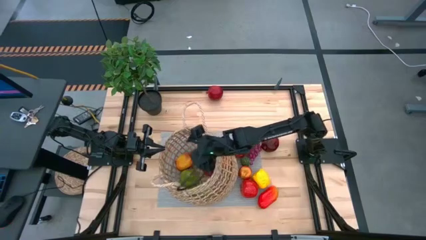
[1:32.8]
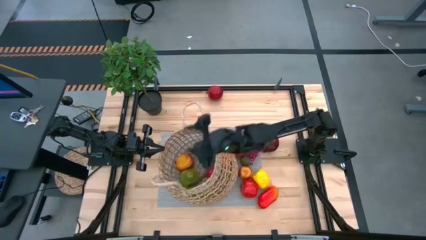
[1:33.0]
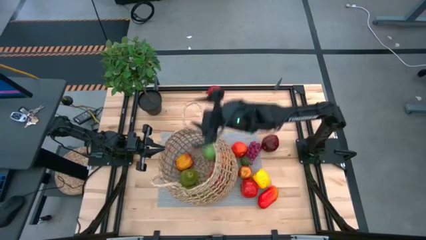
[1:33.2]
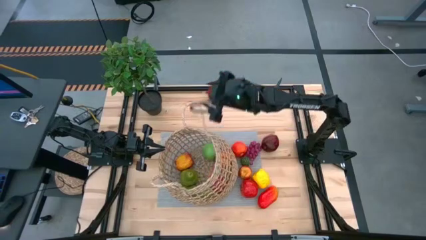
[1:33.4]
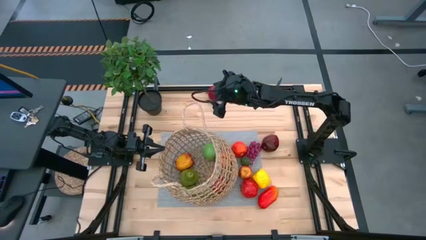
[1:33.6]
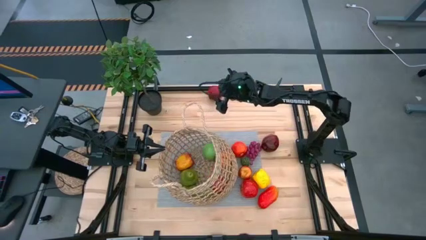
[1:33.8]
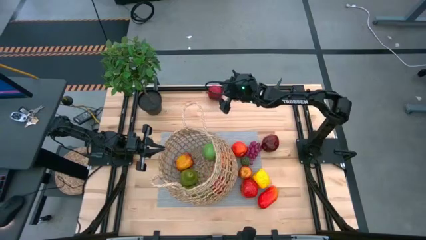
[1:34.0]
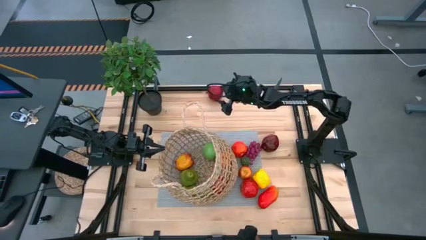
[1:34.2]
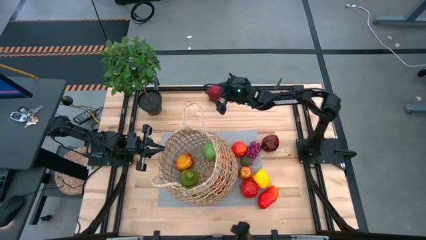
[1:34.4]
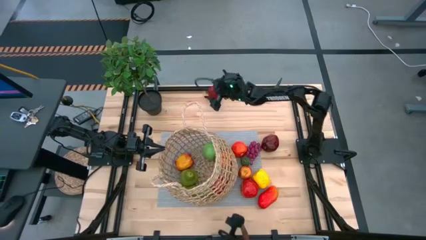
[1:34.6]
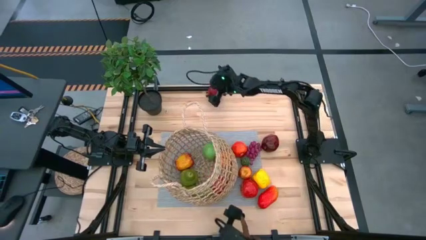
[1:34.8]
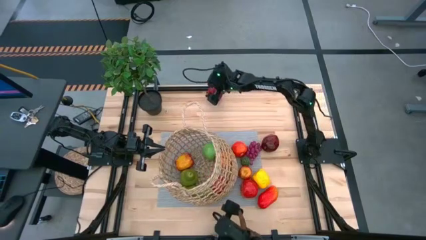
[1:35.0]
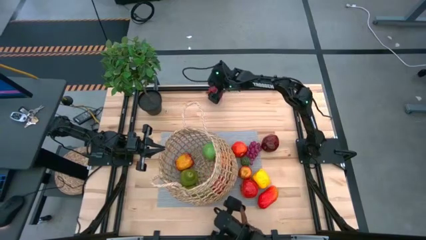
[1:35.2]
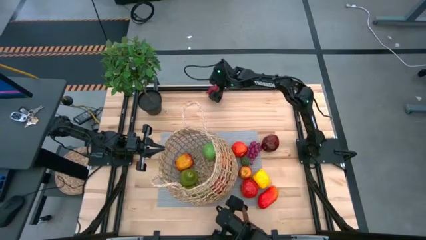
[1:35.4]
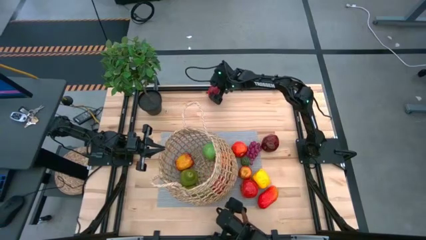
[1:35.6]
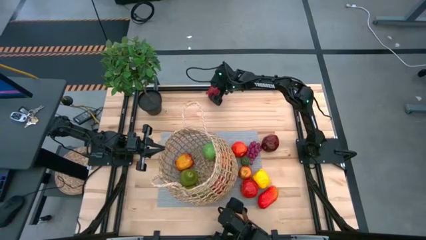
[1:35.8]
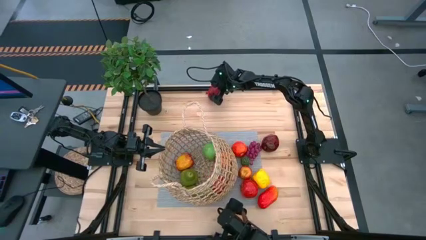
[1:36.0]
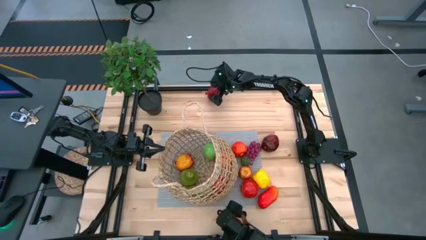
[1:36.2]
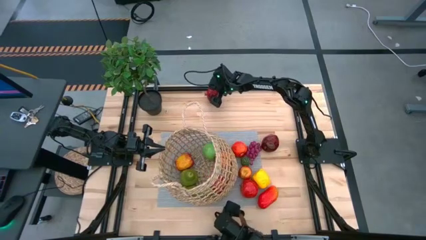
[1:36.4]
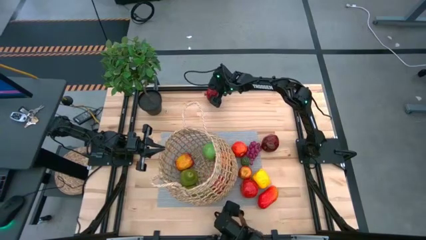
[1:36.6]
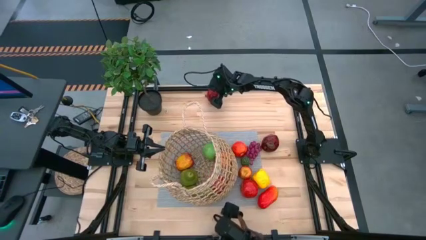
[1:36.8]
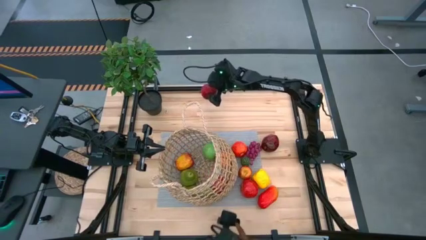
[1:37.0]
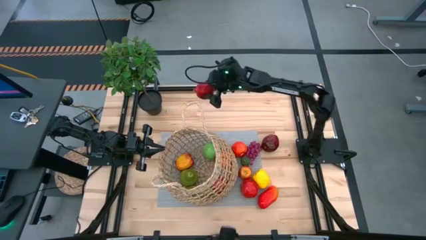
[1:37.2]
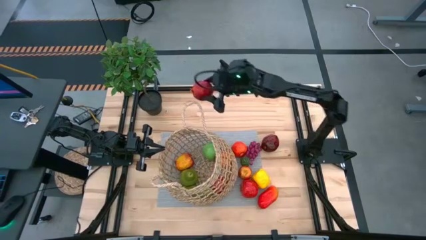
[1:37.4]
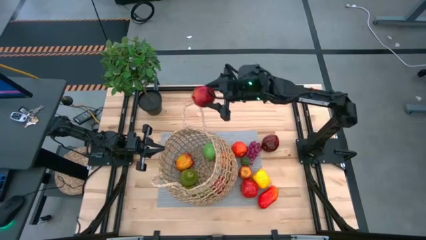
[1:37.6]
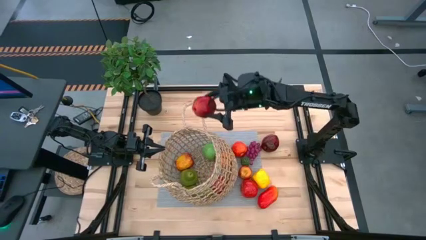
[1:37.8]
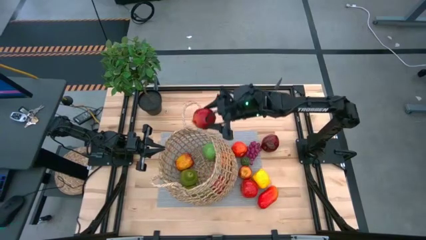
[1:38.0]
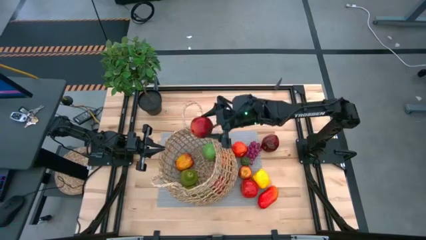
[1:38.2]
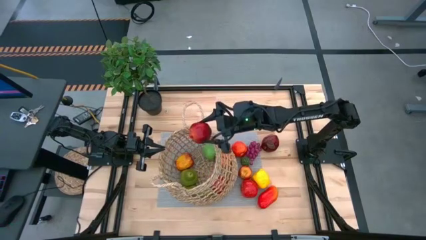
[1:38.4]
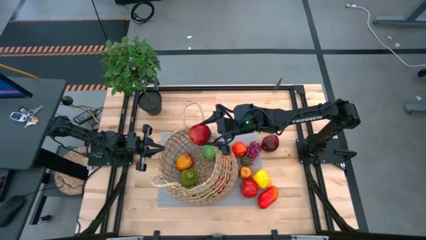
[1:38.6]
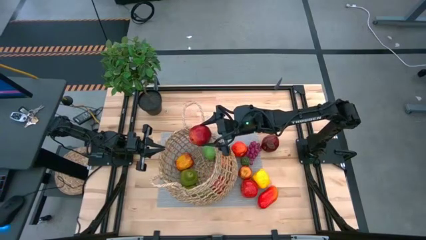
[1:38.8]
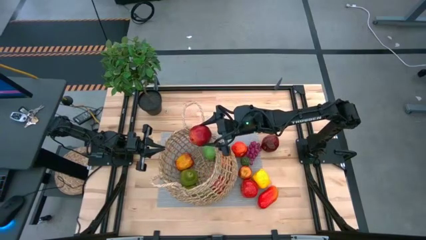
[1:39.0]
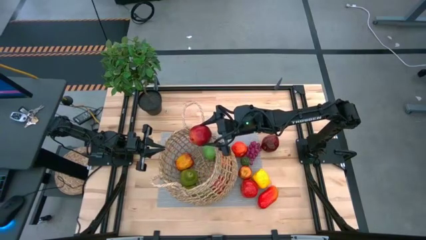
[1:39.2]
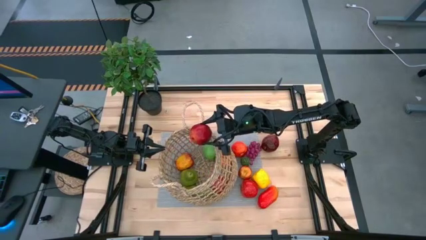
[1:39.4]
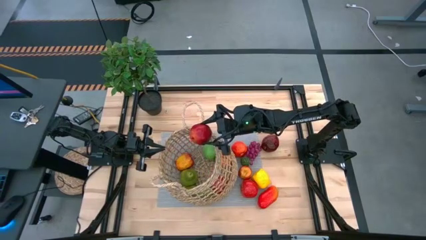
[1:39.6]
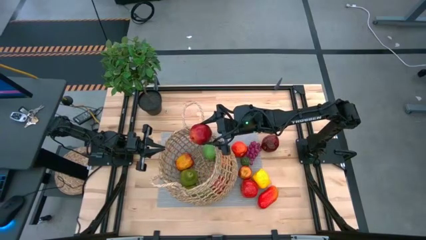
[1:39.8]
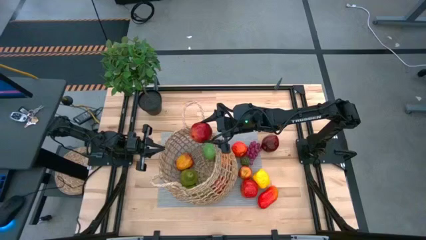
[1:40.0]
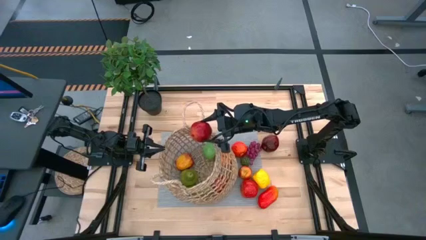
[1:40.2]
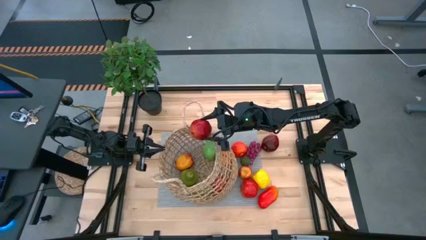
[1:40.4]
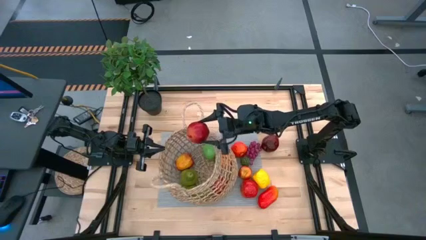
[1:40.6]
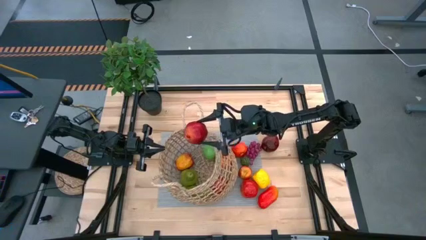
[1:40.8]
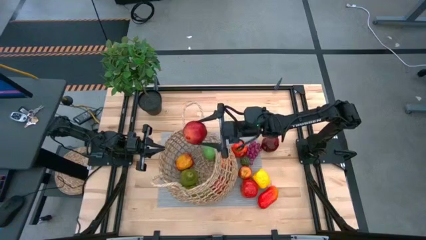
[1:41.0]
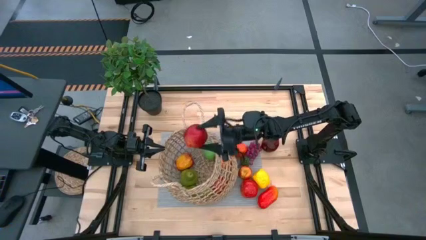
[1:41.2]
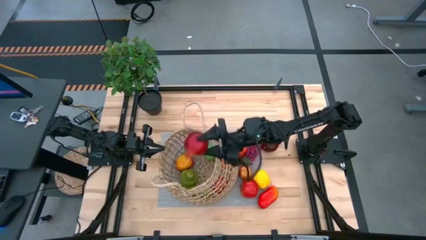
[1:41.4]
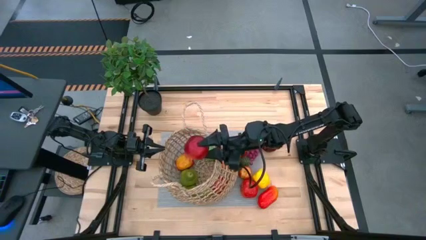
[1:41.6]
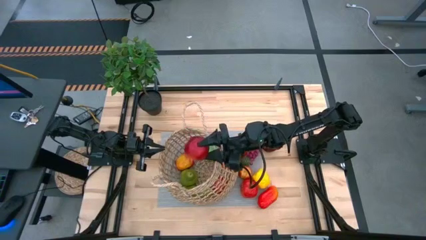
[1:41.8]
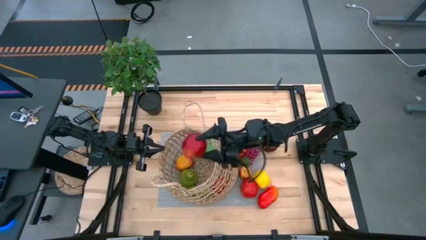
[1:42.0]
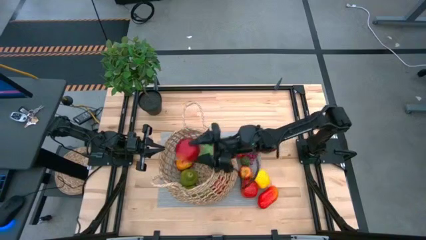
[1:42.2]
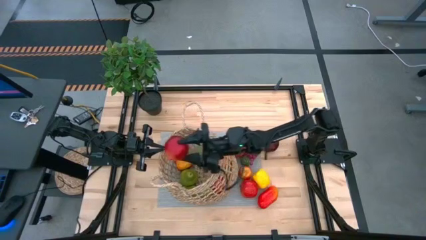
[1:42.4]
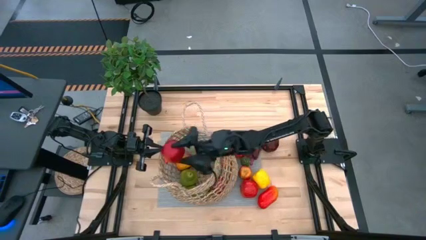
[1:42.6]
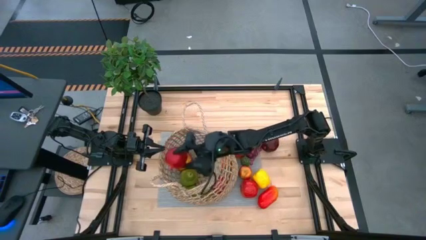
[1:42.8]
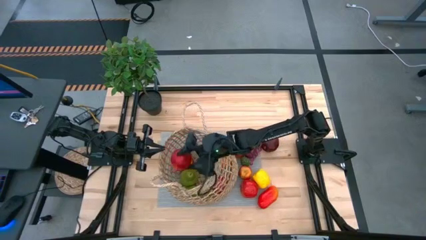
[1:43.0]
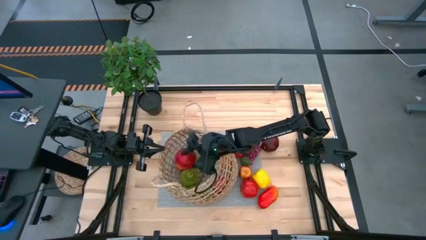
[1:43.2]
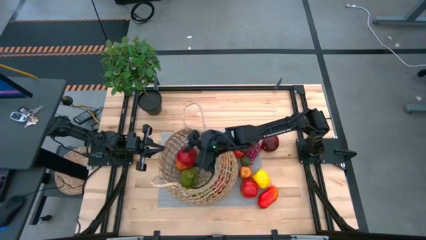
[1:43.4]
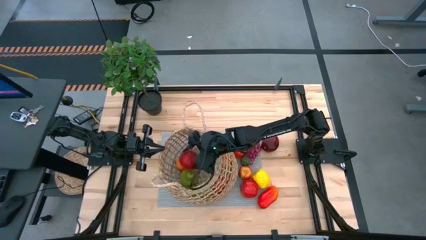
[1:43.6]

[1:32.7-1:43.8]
Task: Build produce basket
Put the pomegranate into the brown basket

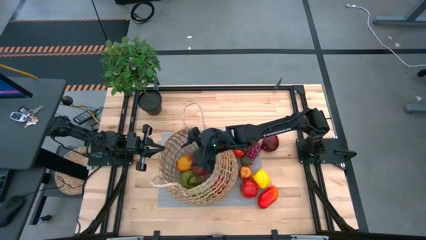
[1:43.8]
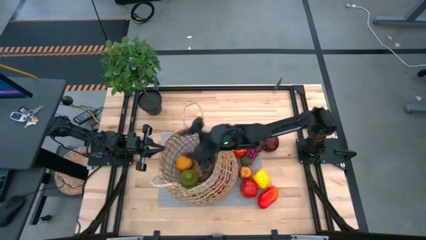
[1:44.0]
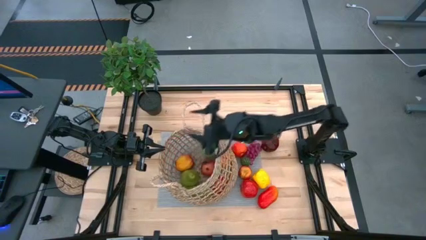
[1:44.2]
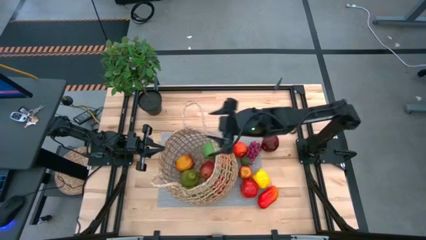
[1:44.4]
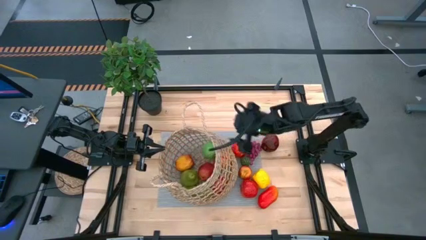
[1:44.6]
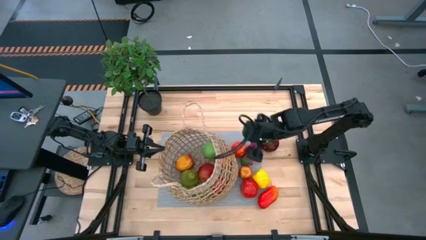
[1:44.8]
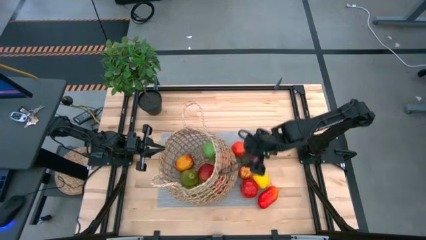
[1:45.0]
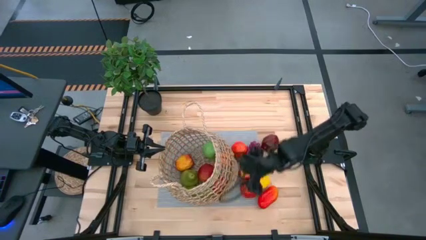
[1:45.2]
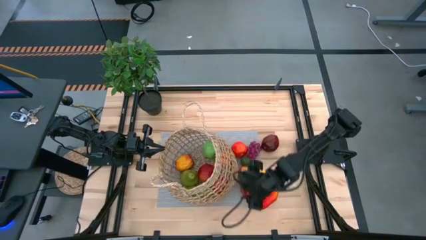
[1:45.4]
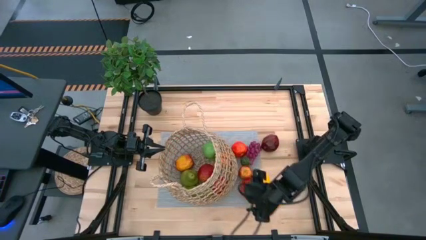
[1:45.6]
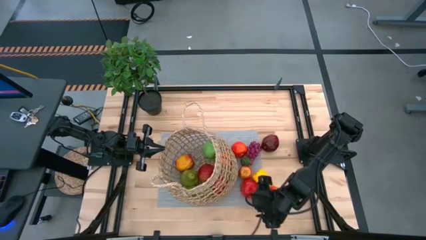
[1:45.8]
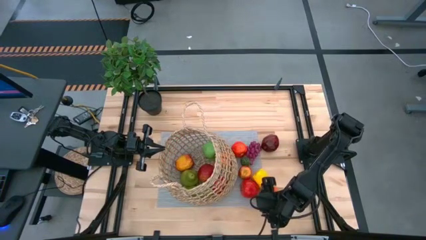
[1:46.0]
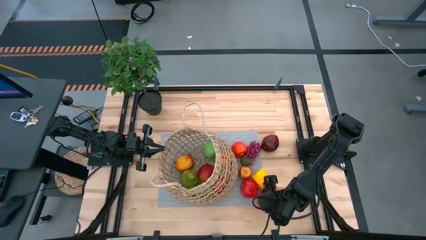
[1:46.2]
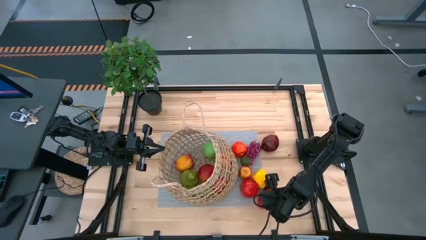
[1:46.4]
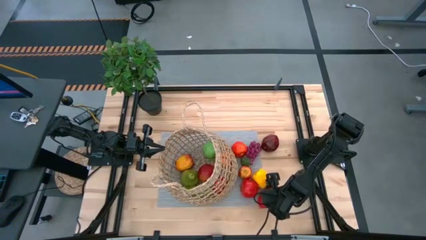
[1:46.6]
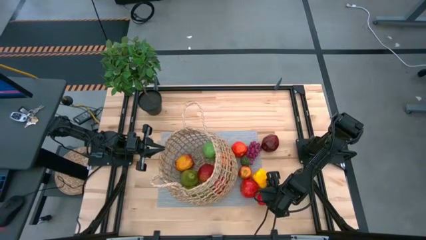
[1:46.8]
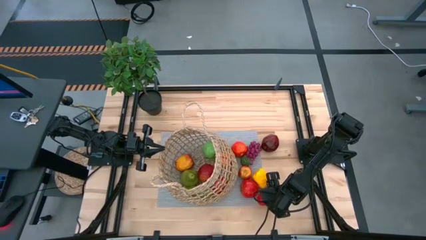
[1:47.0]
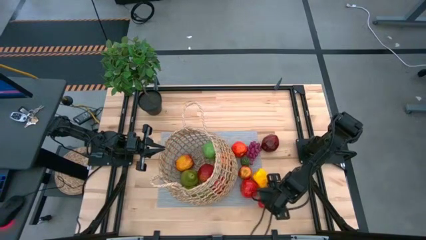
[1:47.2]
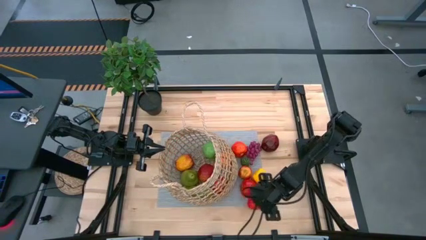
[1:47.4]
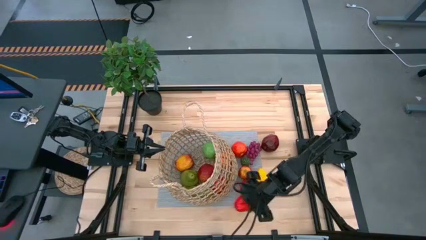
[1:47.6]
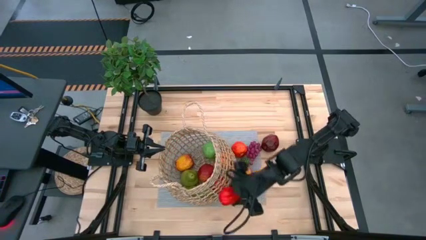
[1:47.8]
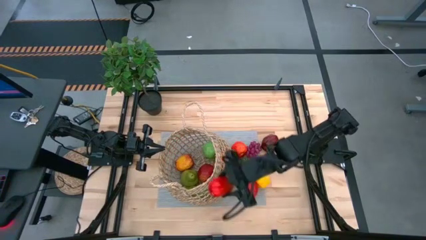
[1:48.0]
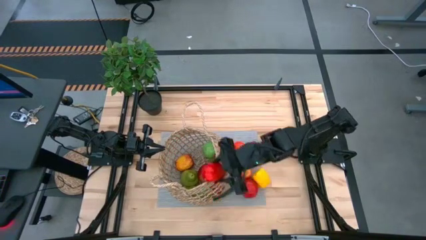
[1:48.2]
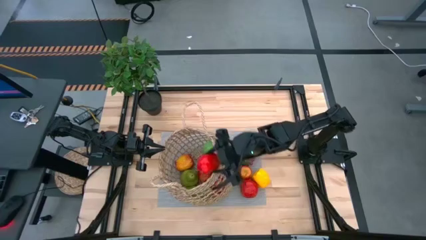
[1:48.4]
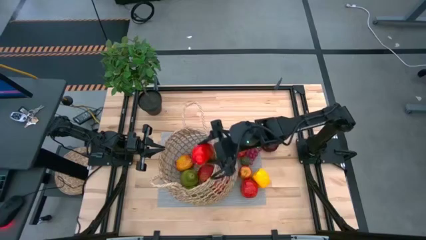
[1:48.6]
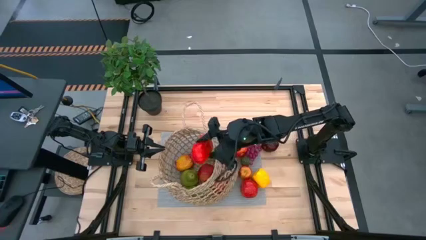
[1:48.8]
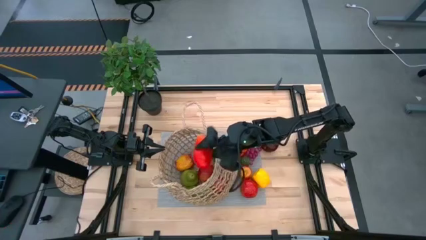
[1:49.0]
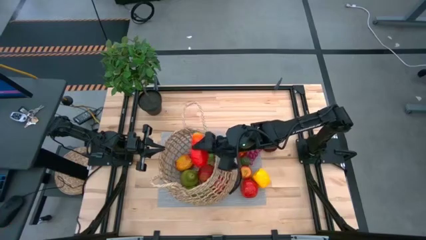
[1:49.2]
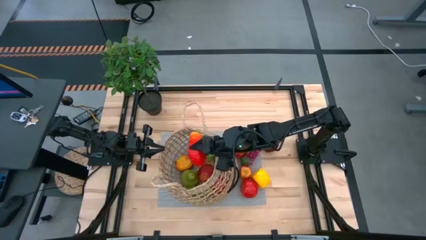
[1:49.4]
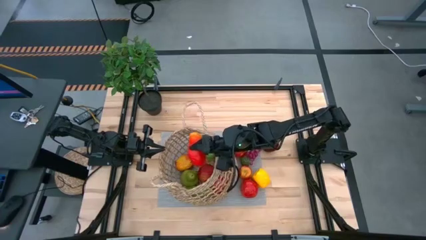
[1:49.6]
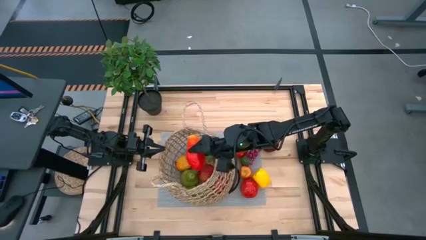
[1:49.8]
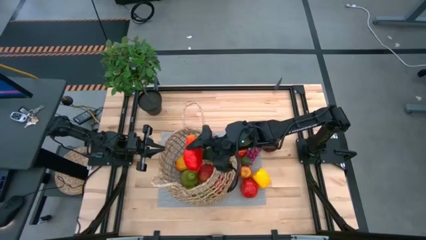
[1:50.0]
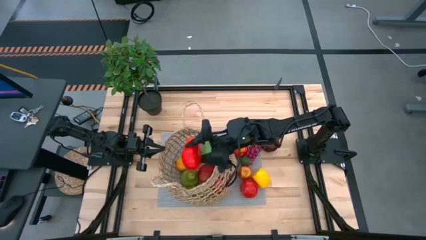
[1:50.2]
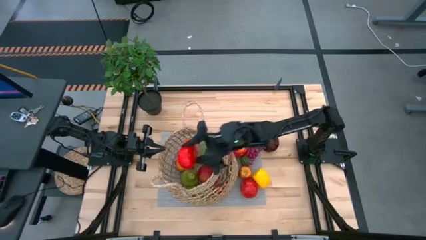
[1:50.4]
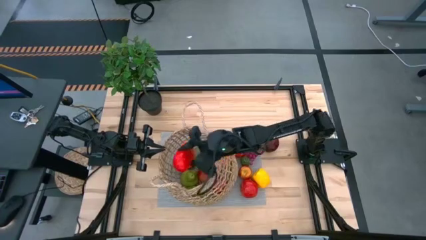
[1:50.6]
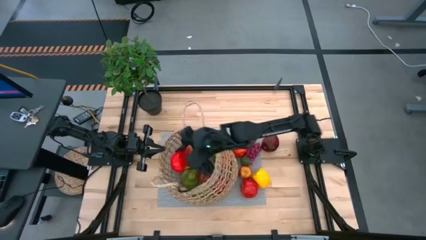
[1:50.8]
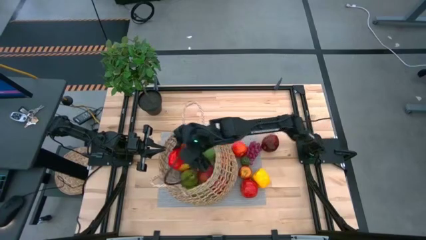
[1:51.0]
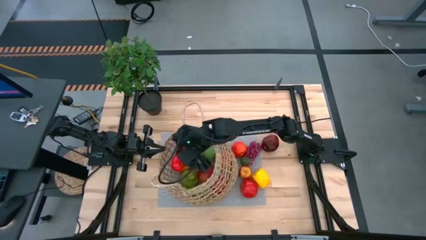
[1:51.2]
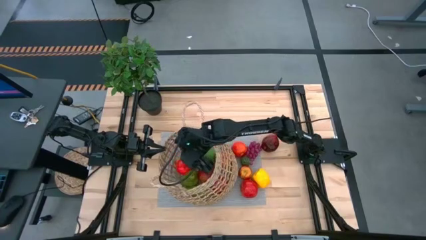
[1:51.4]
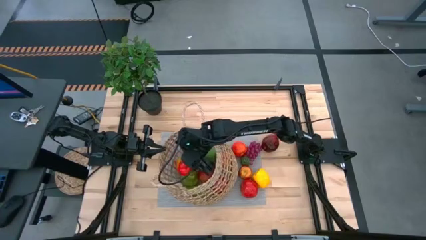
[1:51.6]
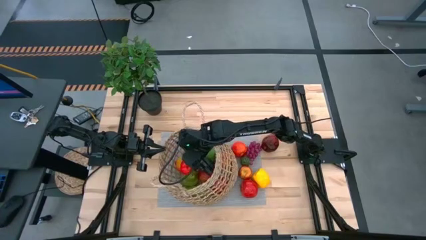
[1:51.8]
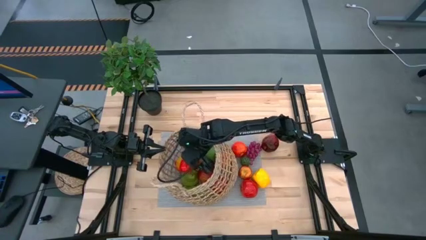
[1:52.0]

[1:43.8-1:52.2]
Put the mango into the brown basket
